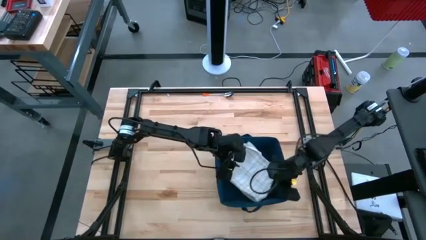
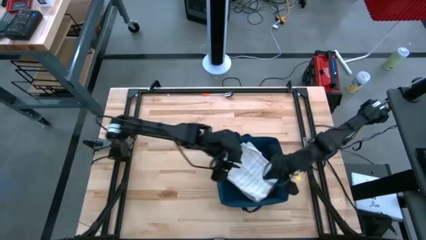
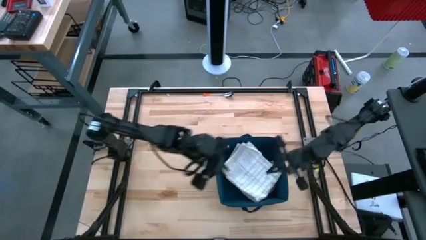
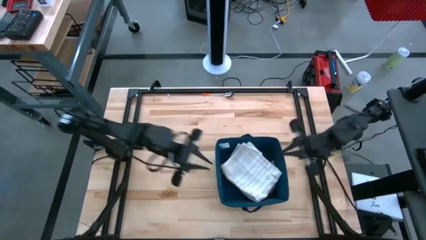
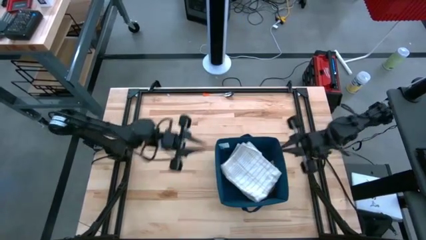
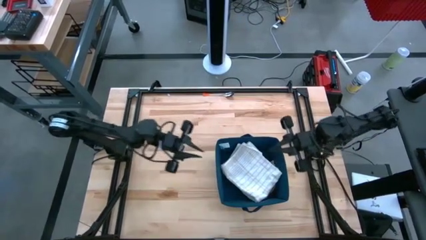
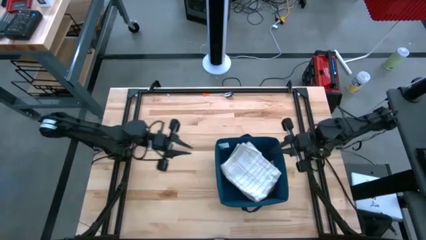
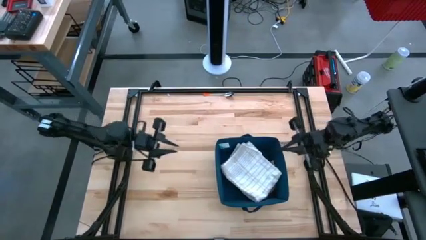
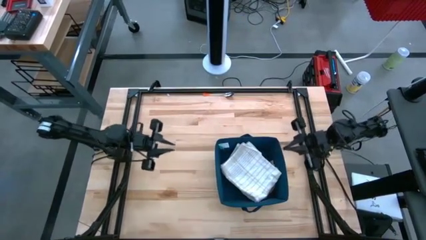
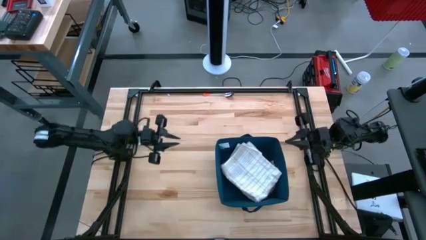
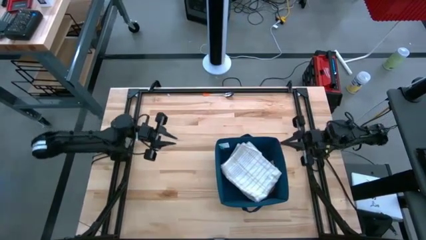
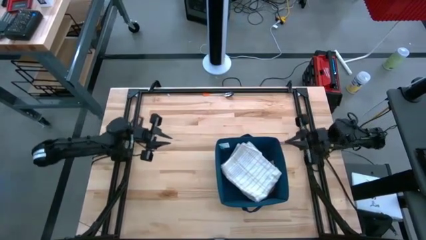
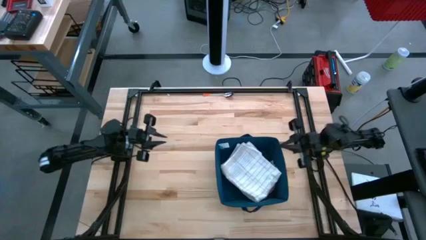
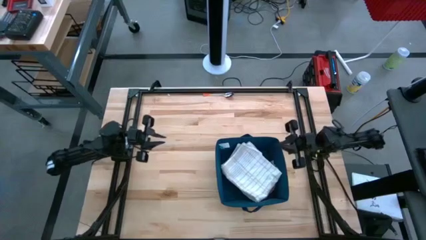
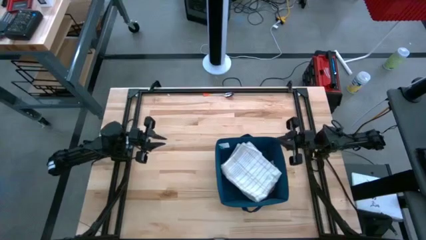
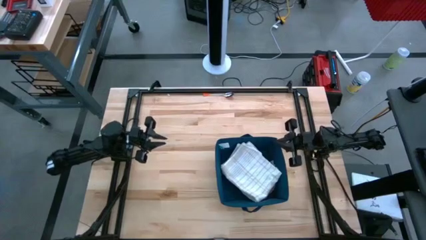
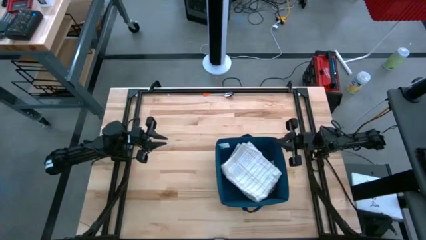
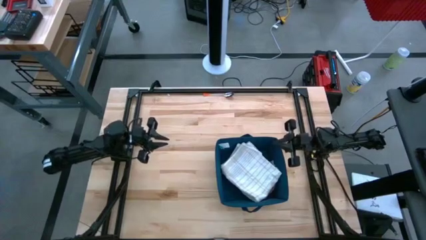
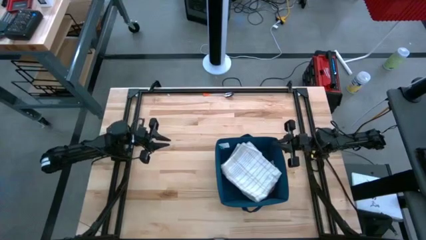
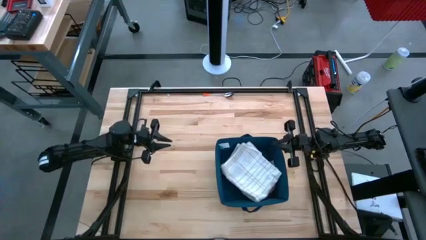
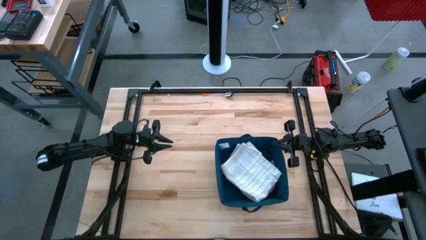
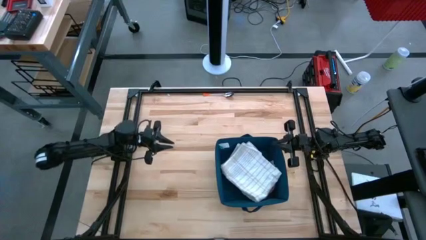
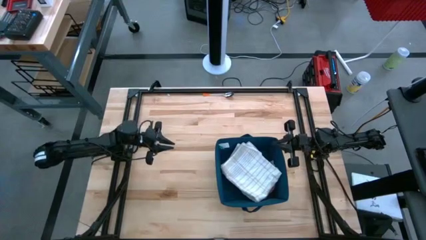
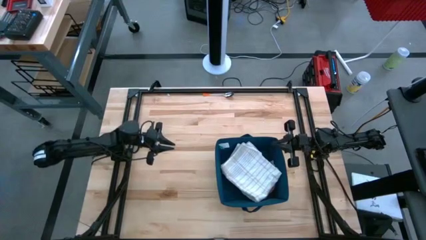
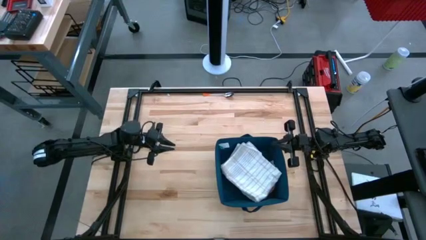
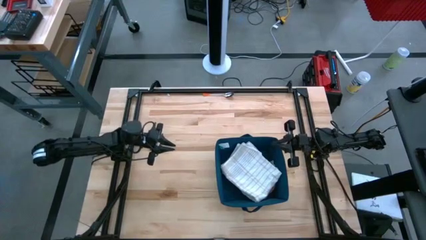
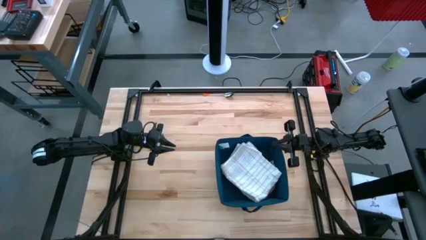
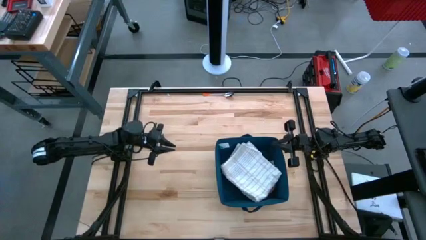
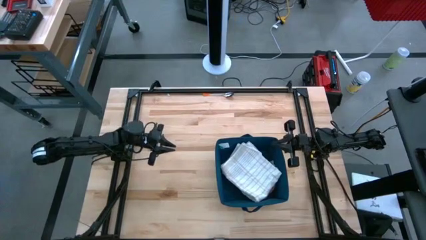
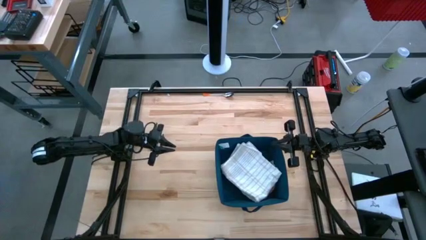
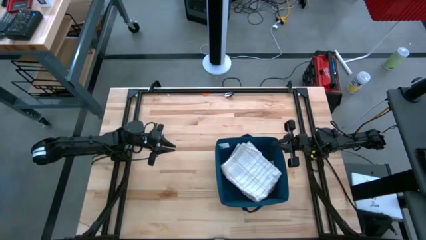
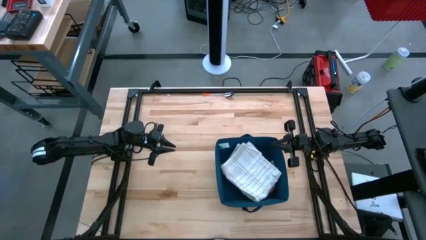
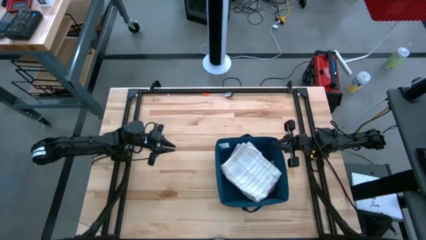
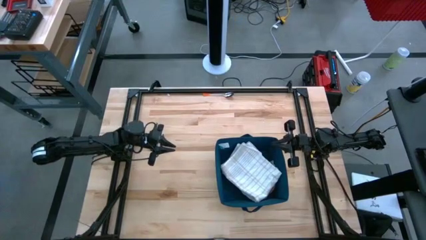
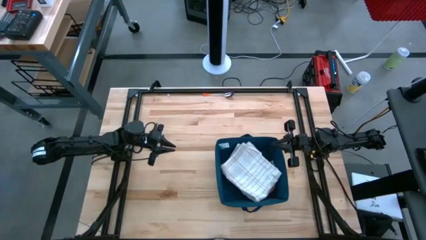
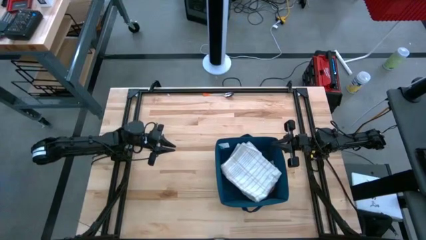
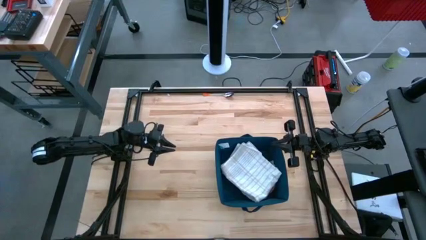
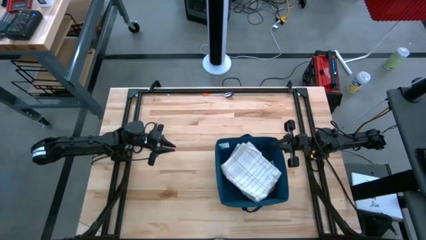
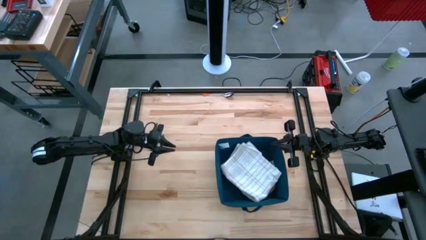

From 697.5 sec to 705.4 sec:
Task: Fold towel
Return to Home Position

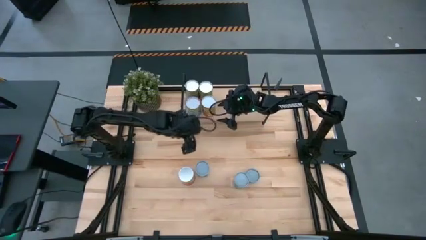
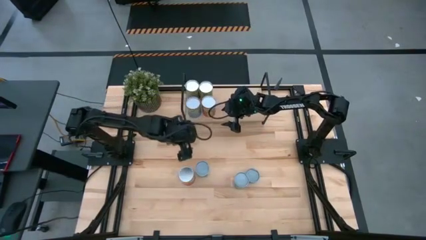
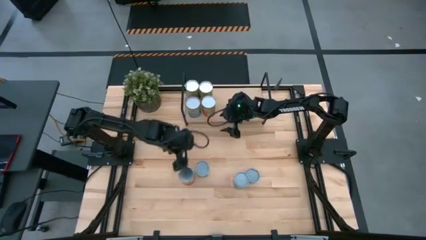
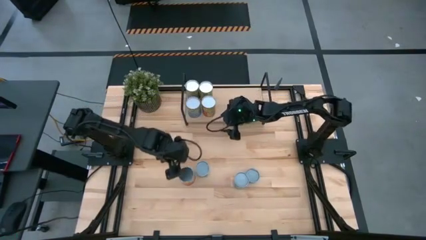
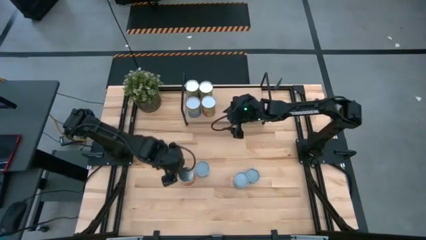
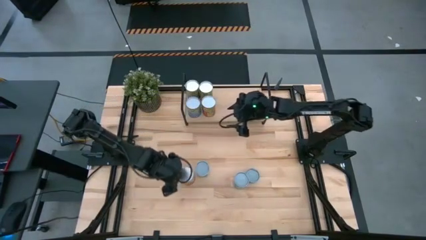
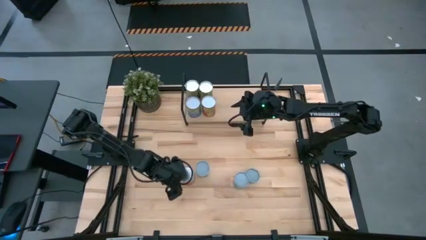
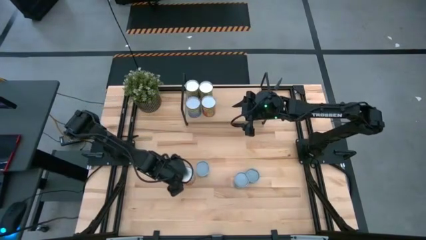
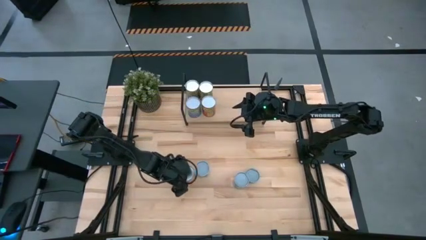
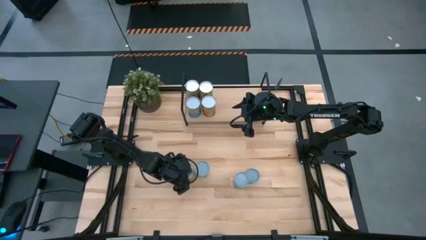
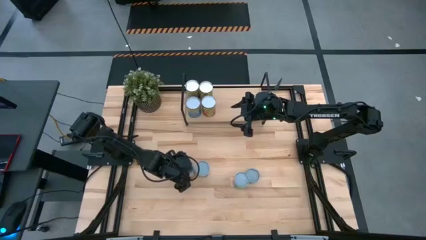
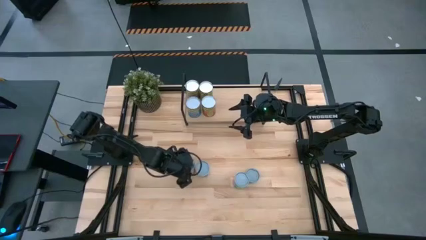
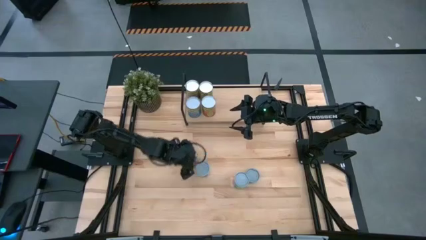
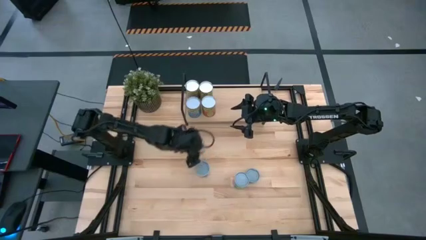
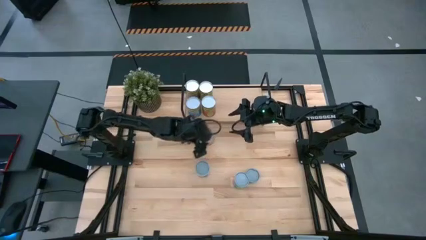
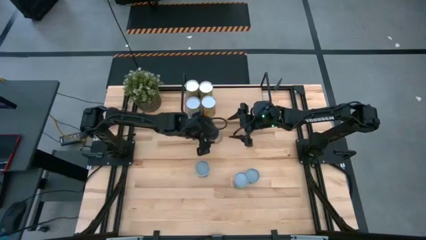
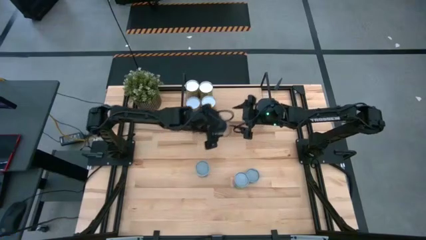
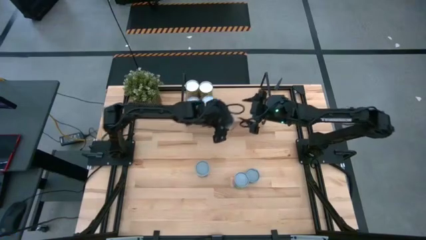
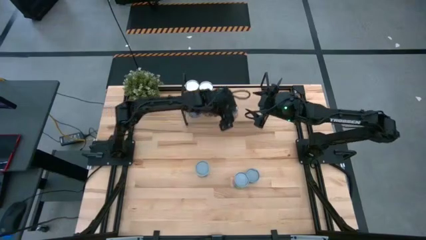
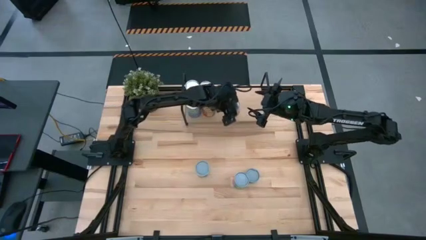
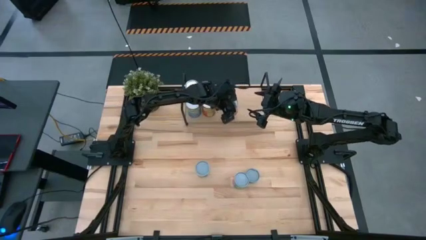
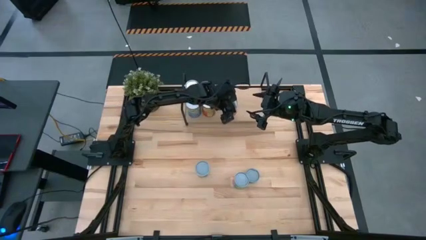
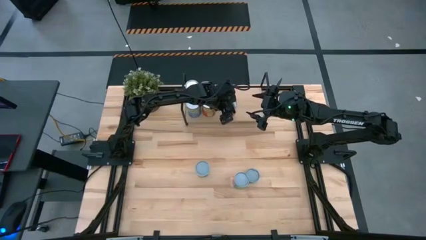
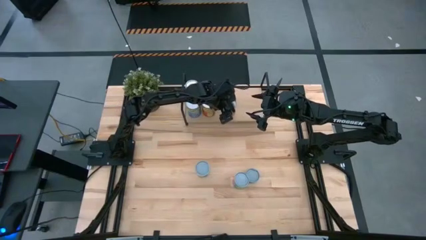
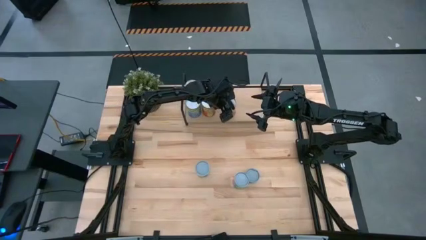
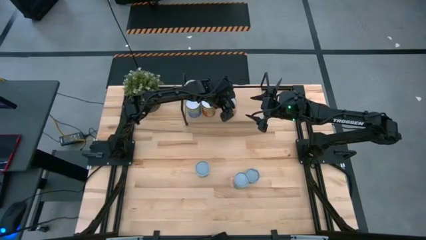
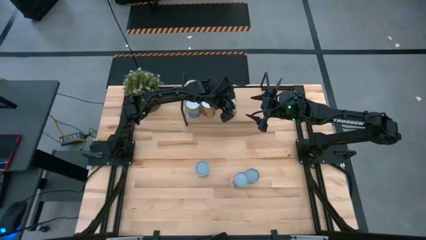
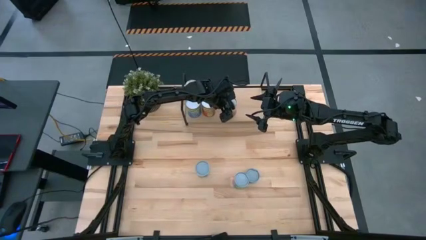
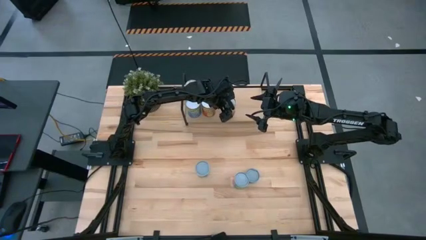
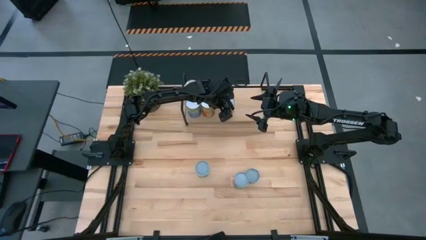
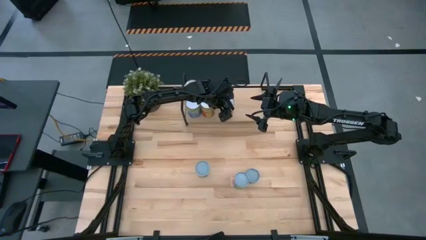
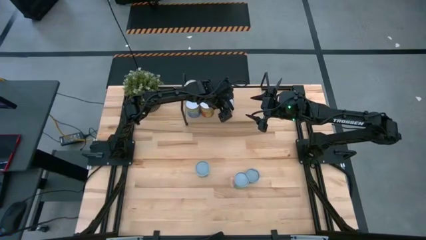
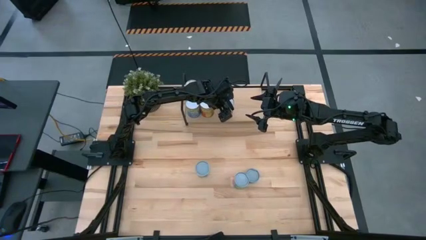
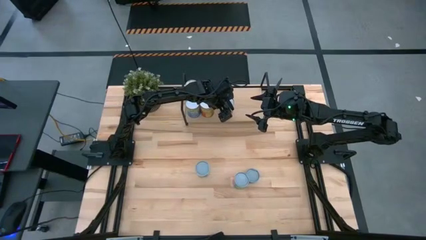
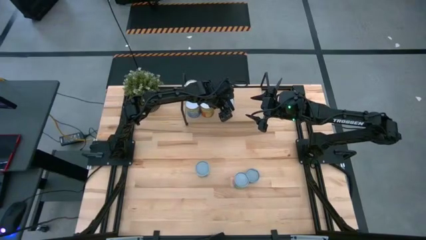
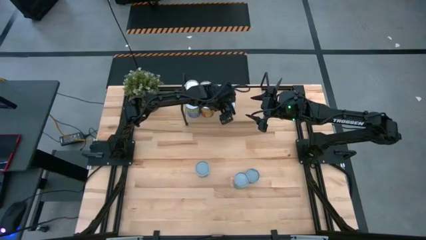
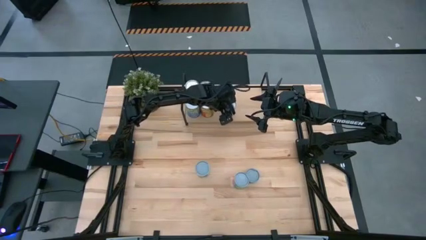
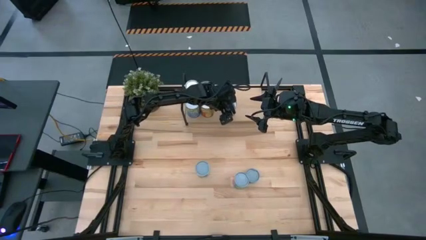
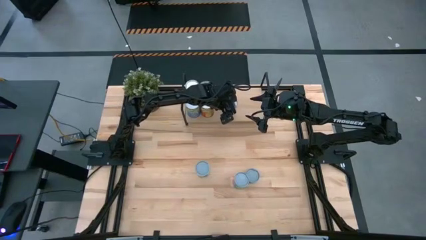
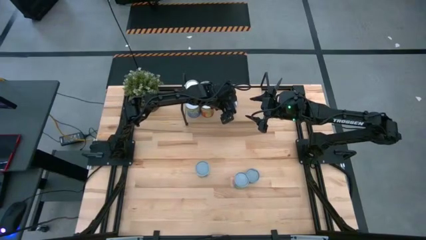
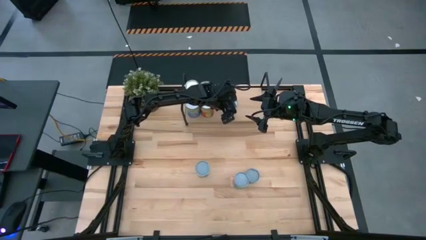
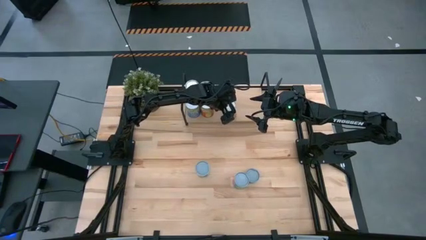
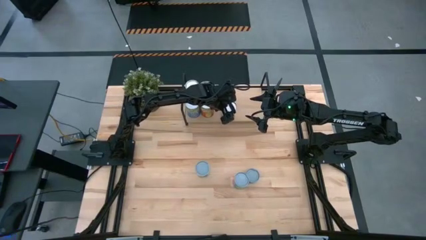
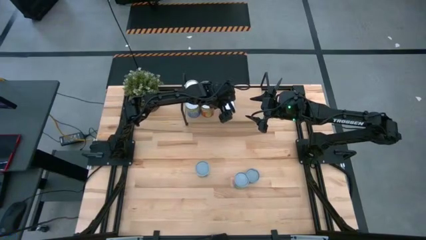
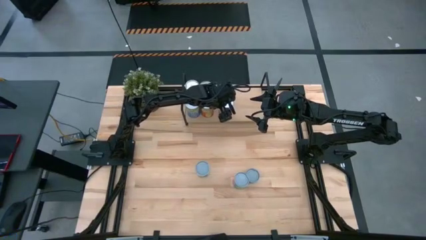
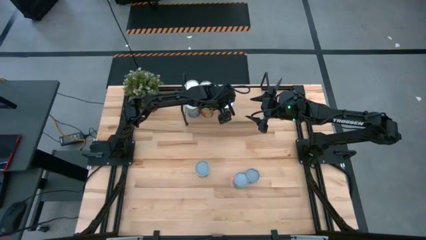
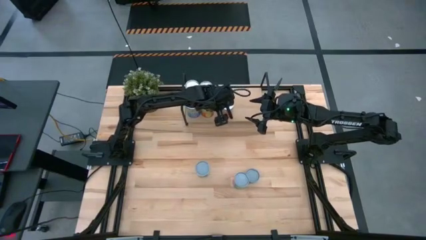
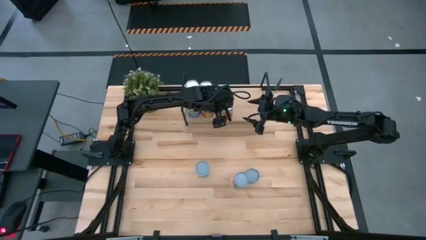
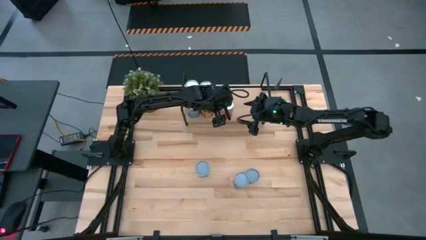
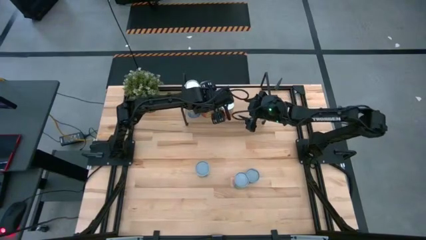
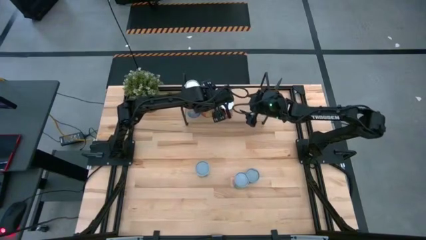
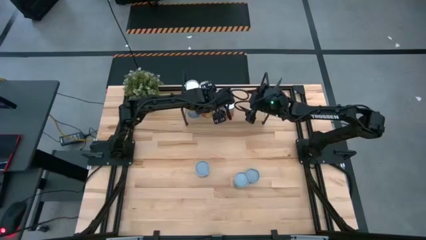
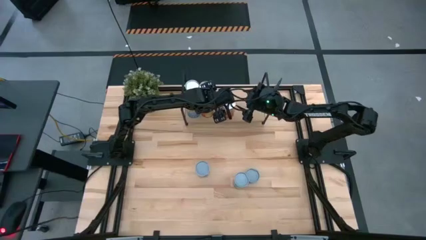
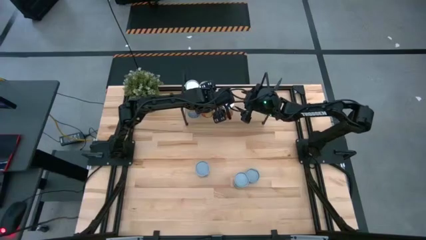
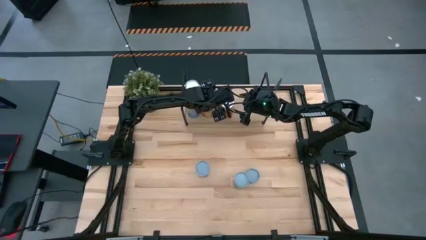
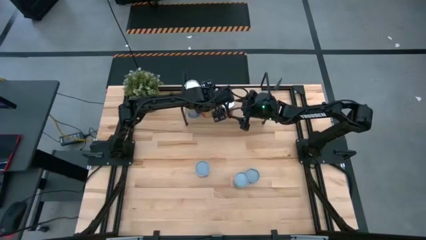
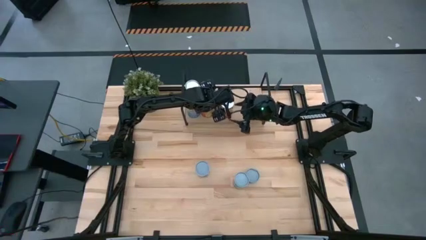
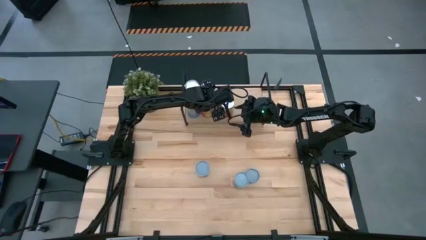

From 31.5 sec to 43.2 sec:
Task: Pick and place cans onto a shelf
Put the middle orange can on the shelf
